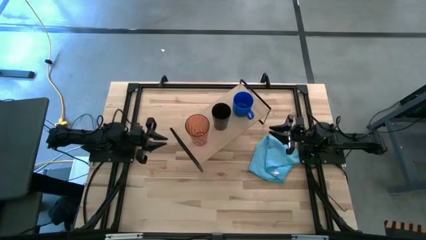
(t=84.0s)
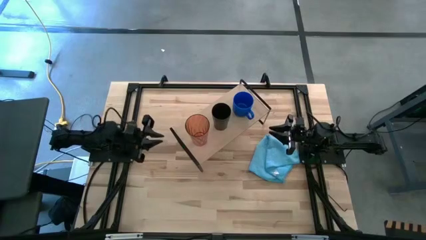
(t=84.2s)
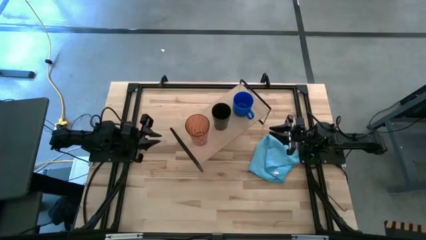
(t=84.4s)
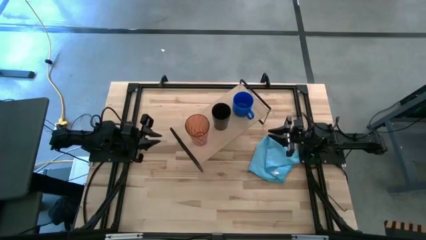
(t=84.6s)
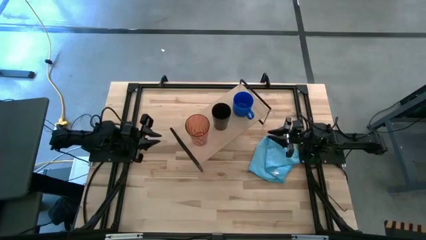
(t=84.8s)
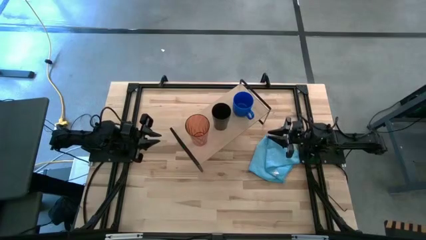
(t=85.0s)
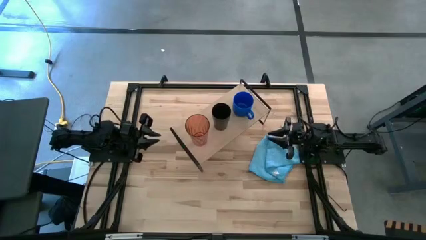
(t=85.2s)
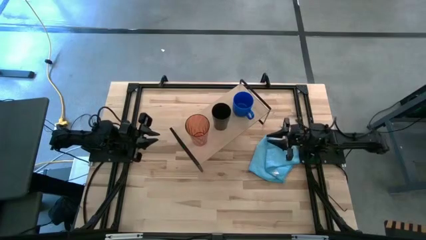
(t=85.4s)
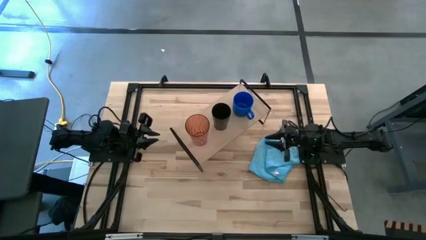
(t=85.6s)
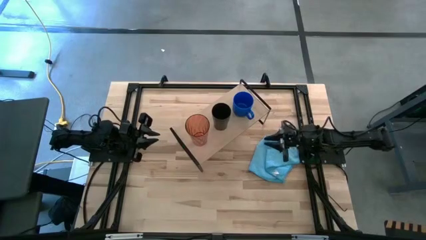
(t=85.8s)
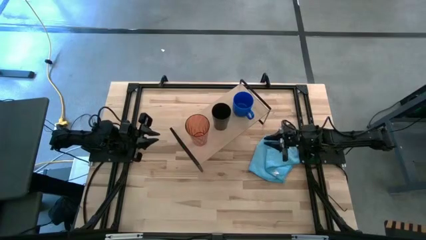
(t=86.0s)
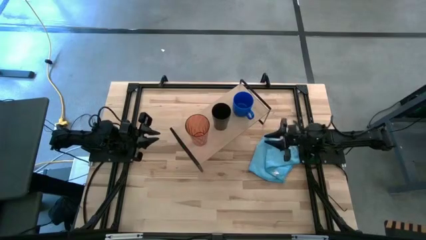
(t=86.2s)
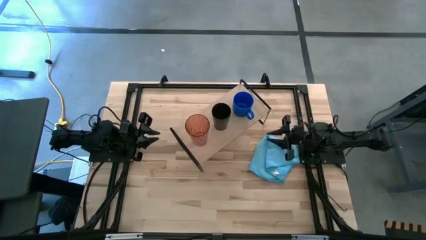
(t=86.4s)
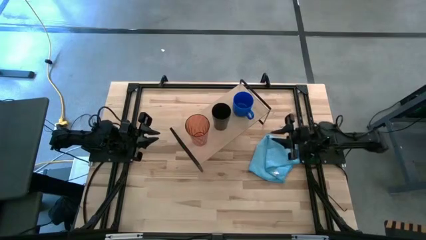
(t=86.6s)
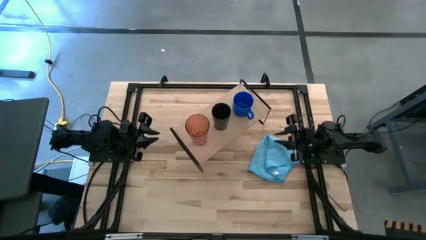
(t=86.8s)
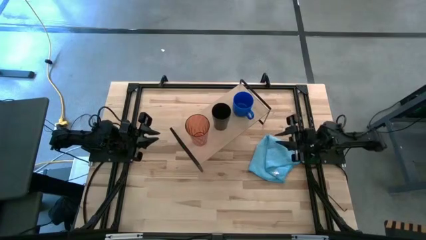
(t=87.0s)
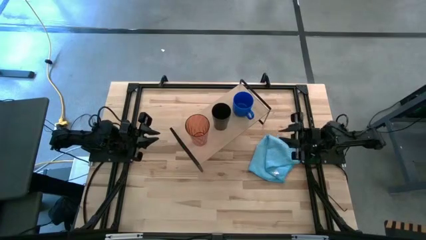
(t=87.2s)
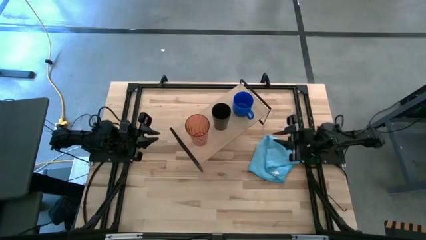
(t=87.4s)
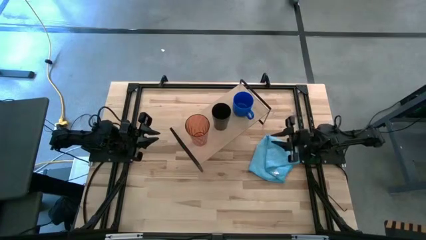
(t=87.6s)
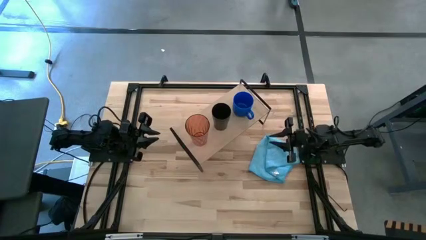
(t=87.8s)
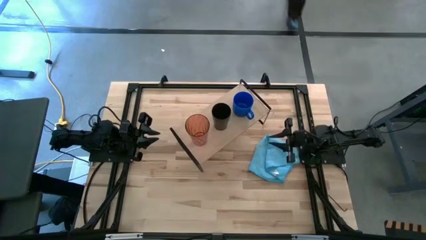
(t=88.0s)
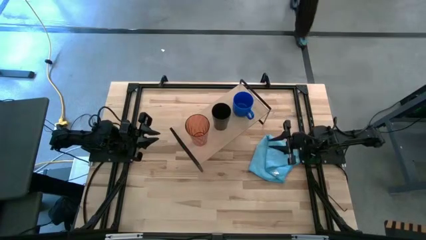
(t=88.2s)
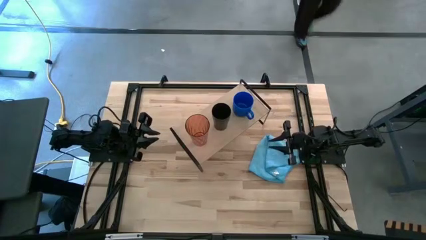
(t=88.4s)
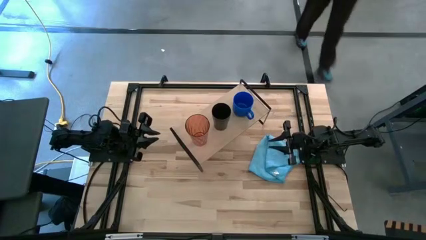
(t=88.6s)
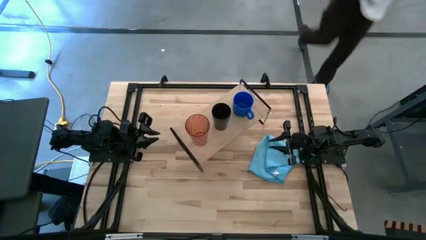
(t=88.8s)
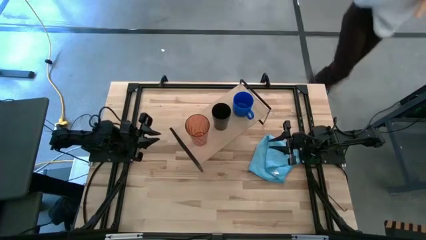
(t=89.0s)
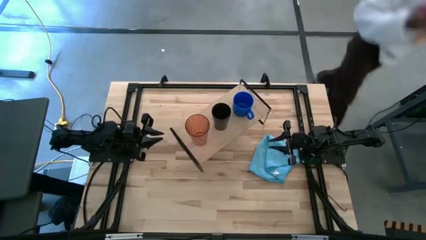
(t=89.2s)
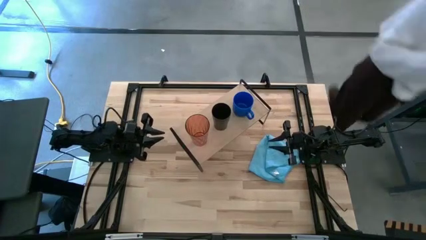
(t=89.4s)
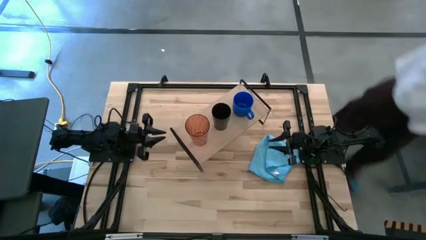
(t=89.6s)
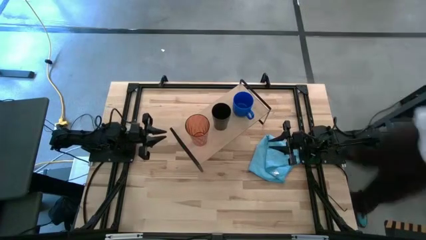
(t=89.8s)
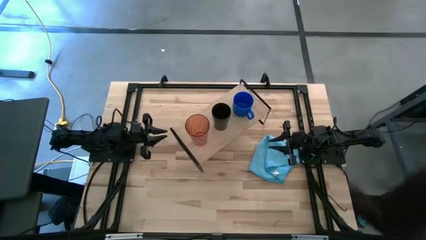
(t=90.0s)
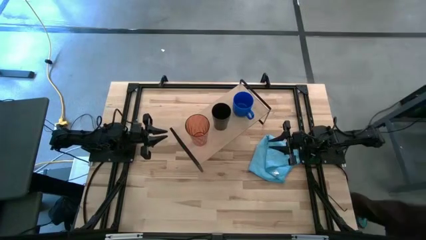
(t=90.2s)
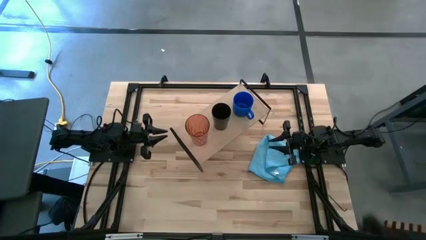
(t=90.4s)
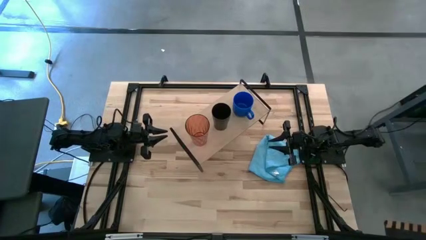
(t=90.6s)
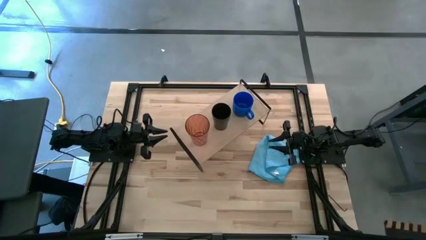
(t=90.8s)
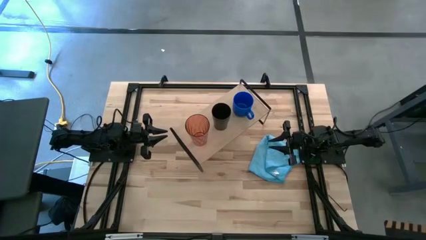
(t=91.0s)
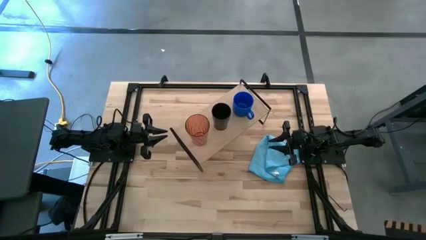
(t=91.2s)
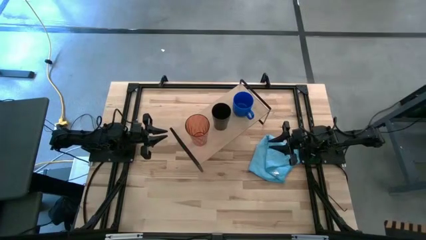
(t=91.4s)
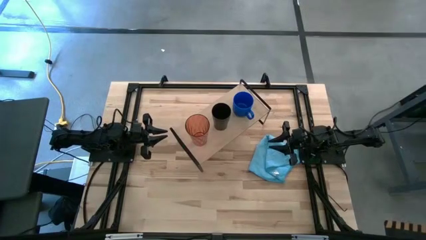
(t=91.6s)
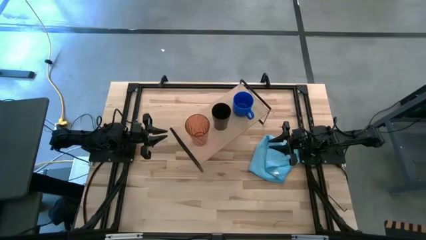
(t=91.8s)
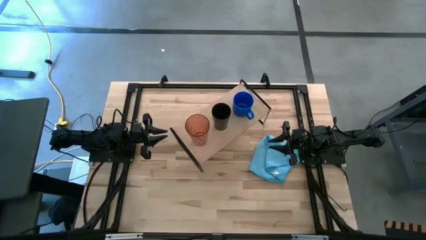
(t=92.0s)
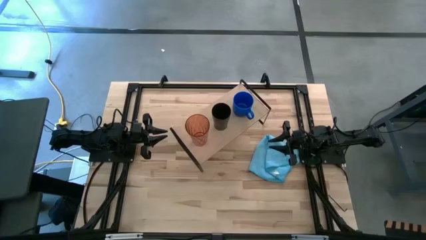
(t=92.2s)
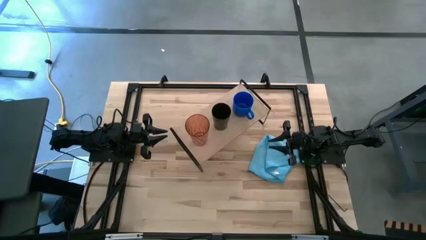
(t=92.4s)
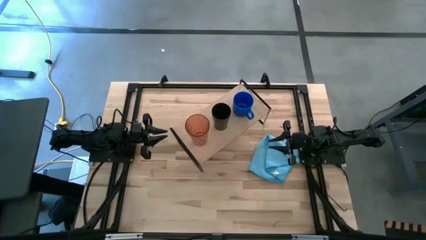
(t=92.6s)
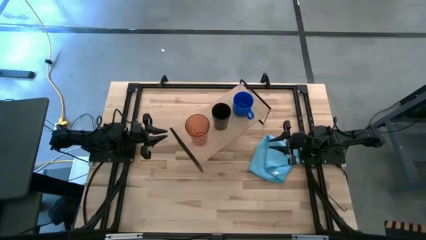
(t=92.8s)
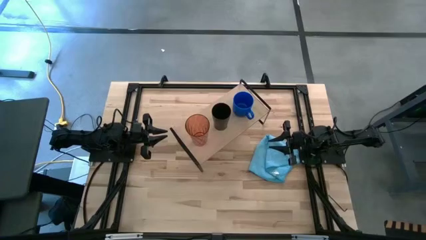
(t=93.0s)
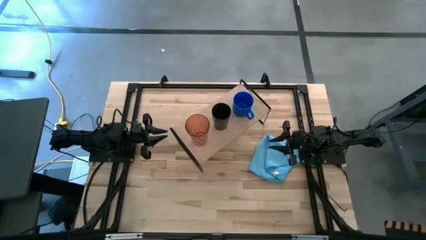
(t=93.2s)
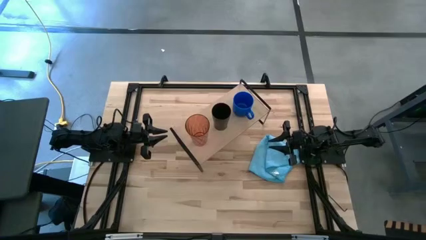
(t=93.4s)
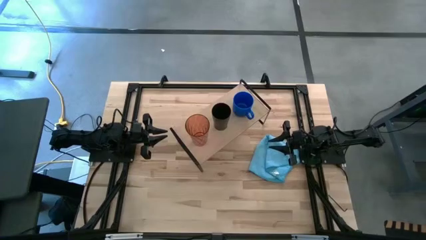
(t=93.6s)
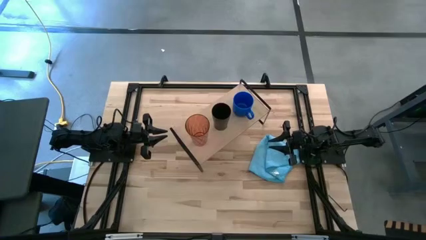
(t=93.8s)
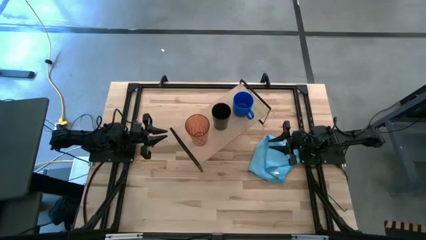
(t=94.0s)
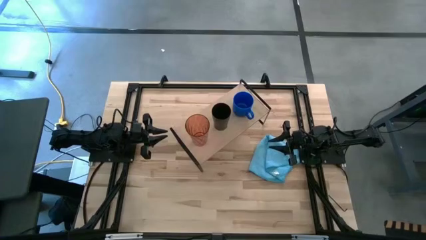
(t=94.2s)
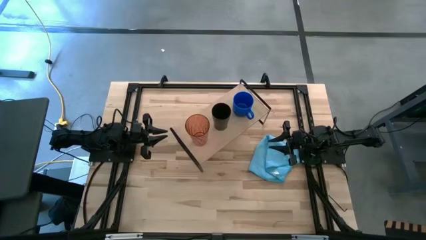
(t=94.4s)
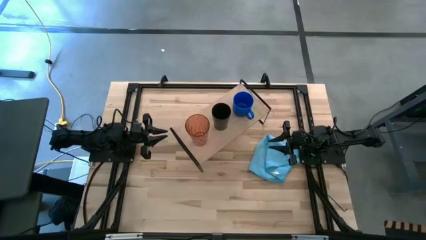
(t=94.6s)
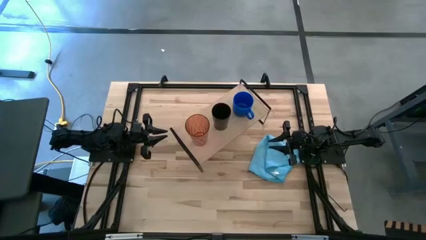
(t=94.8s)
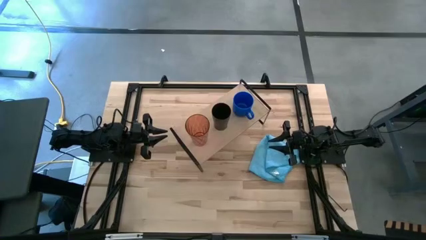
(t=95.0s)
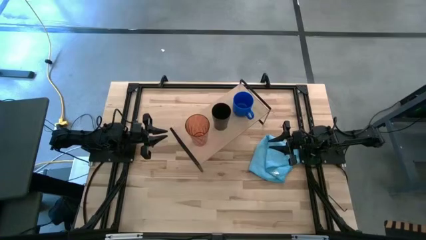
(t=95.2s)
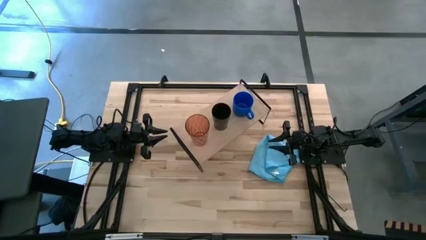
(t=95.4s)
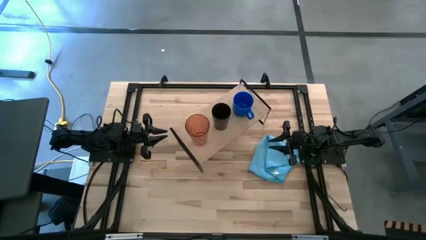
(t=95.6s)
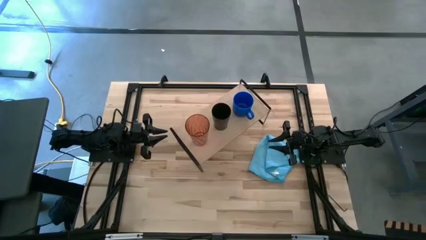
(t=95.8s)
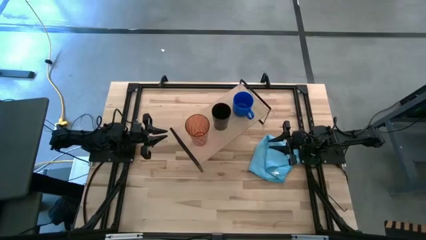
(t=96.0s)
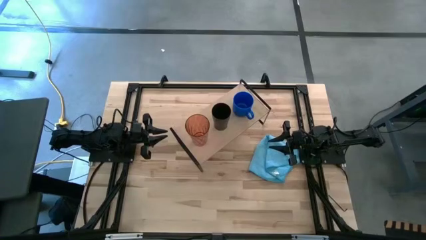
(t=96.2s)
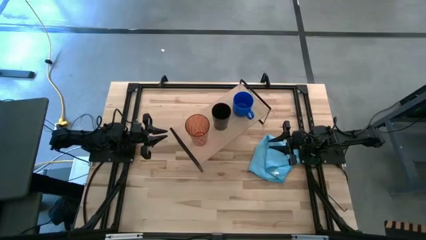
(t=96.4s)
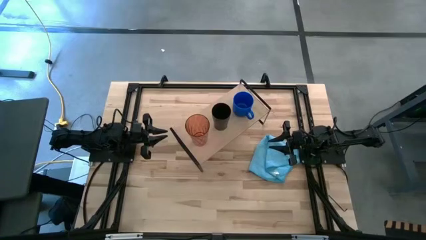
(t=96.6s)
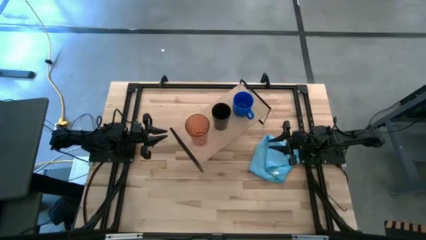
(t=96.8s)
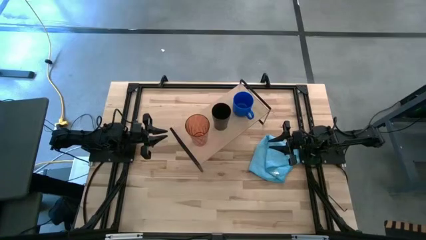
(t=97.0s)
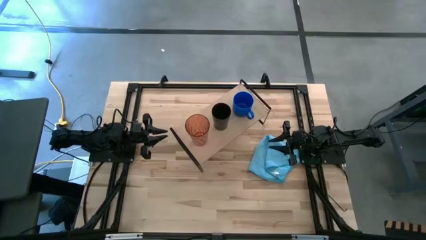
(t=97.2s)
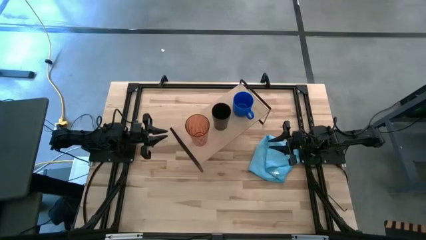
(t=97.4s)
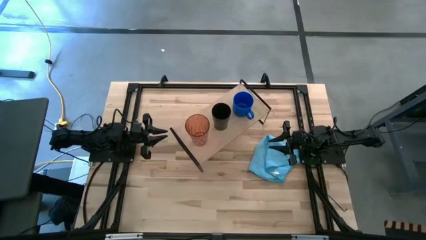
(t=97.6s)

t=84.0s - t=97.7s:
Task: Stack small to large cups/mugs on shelf
Return to Home Position
